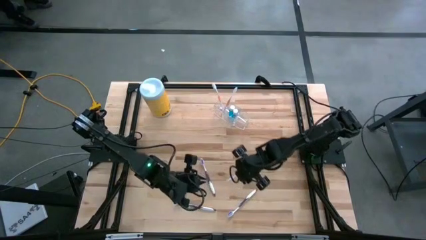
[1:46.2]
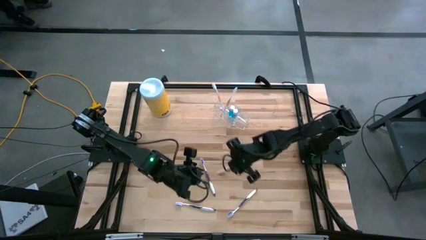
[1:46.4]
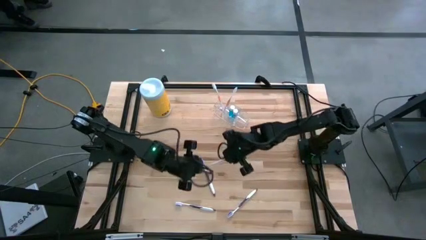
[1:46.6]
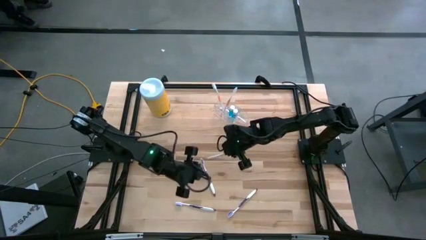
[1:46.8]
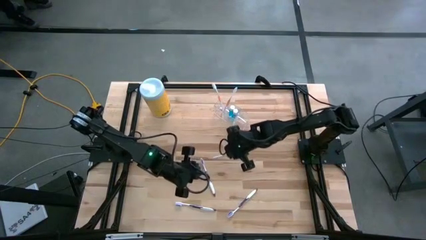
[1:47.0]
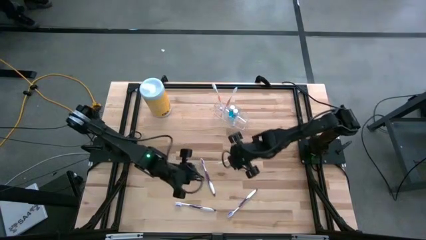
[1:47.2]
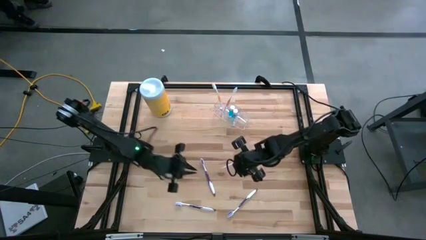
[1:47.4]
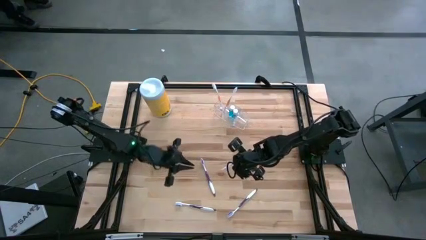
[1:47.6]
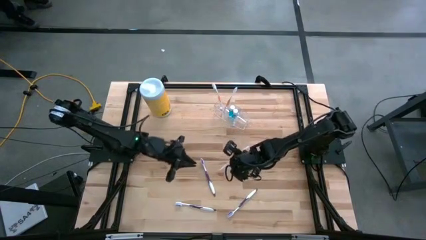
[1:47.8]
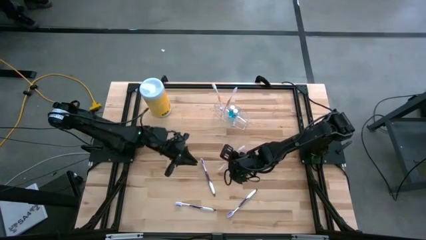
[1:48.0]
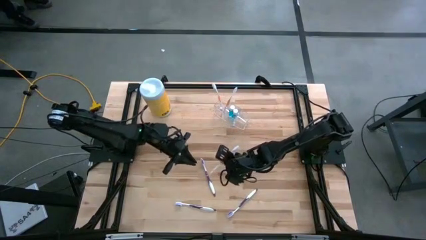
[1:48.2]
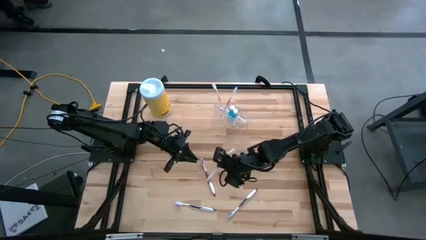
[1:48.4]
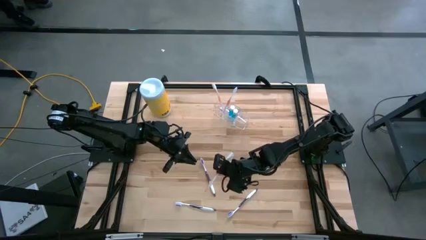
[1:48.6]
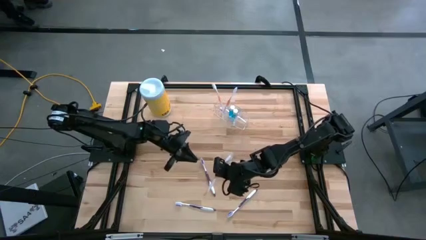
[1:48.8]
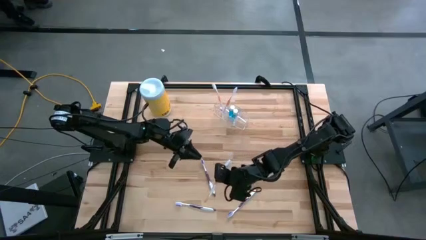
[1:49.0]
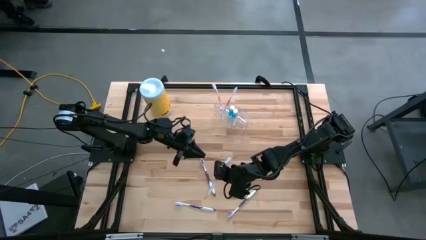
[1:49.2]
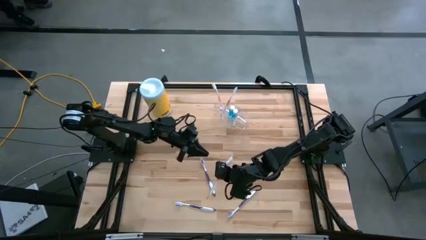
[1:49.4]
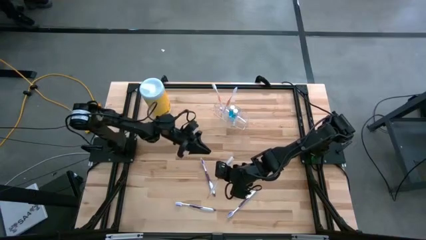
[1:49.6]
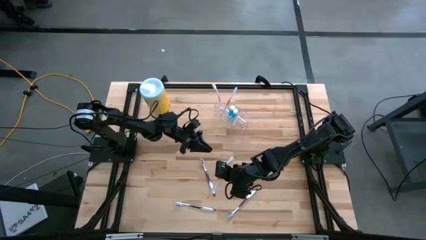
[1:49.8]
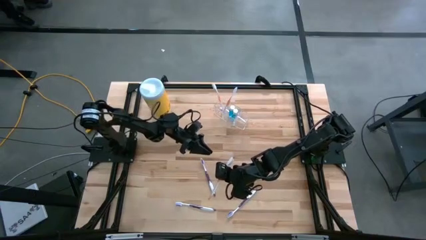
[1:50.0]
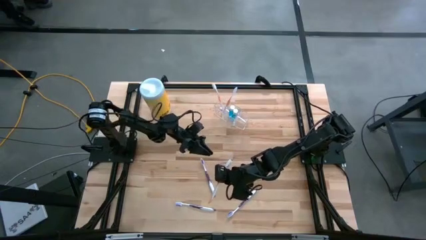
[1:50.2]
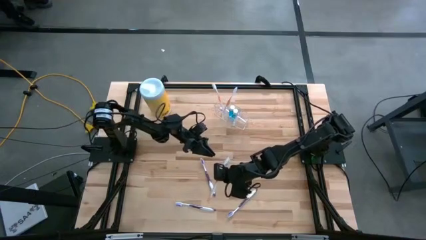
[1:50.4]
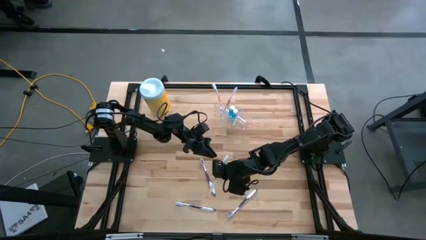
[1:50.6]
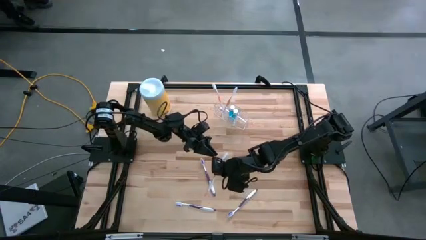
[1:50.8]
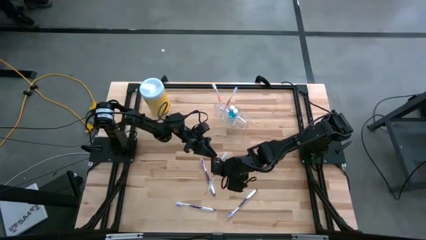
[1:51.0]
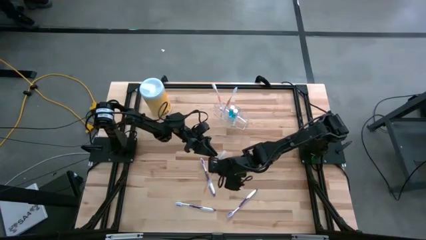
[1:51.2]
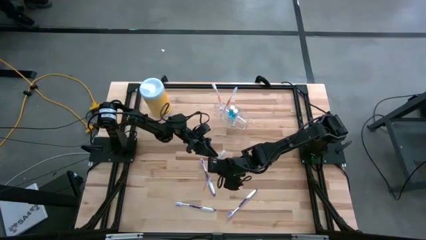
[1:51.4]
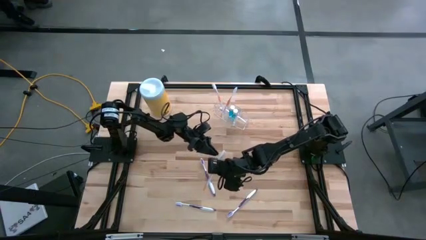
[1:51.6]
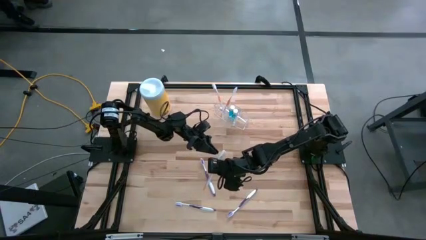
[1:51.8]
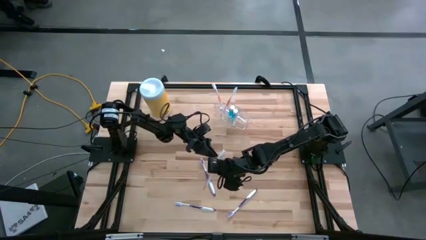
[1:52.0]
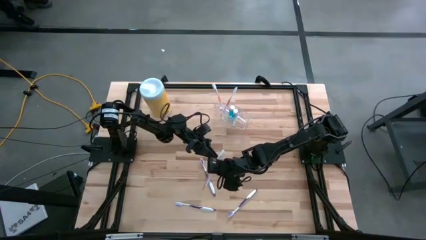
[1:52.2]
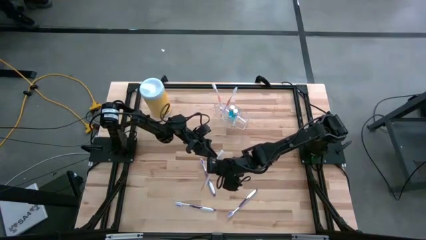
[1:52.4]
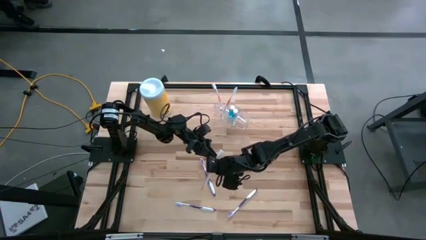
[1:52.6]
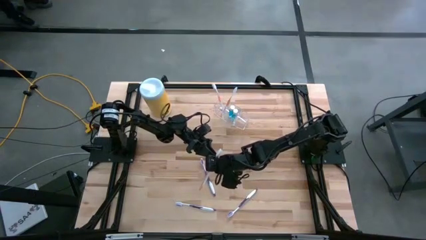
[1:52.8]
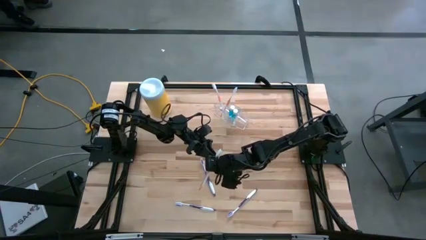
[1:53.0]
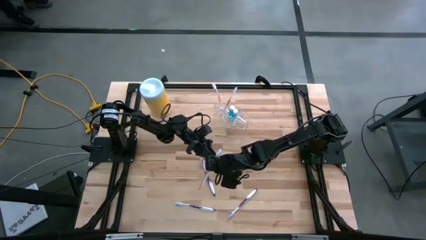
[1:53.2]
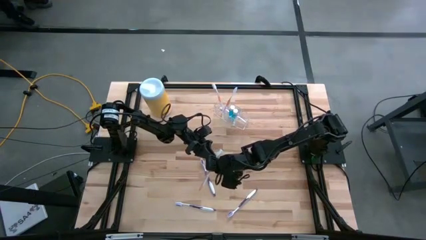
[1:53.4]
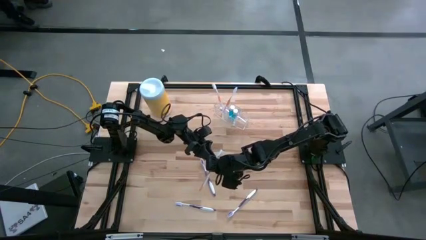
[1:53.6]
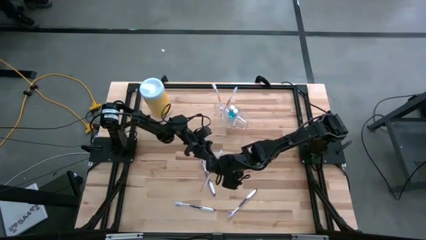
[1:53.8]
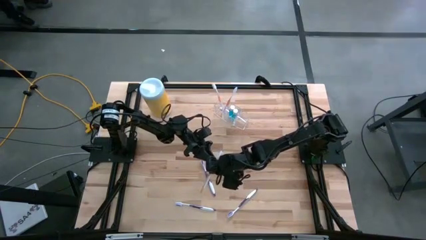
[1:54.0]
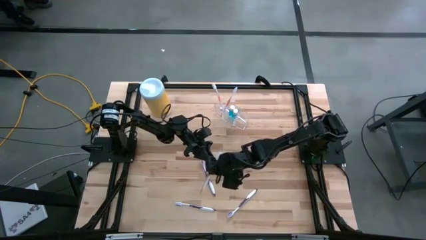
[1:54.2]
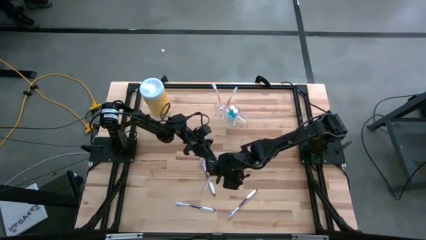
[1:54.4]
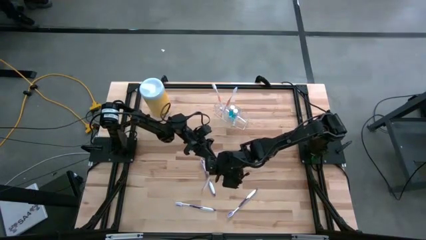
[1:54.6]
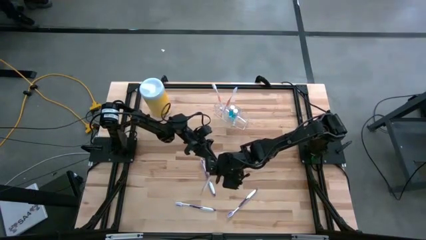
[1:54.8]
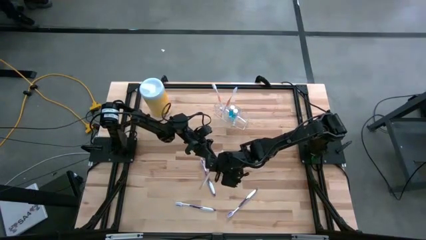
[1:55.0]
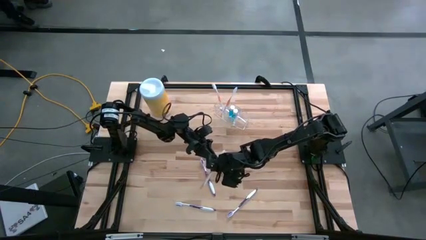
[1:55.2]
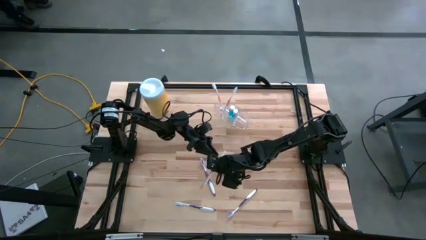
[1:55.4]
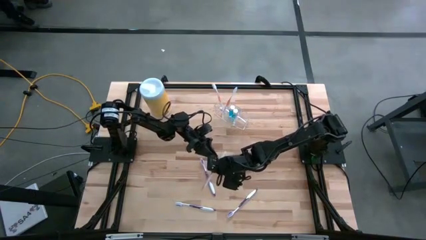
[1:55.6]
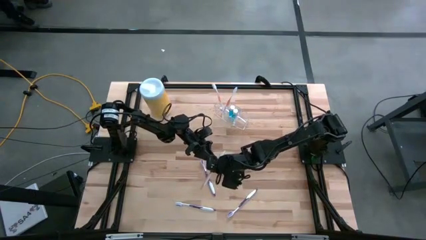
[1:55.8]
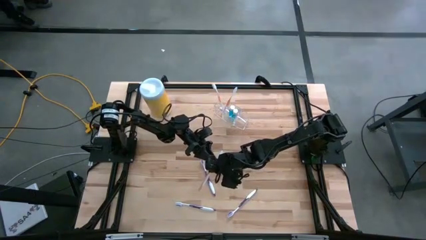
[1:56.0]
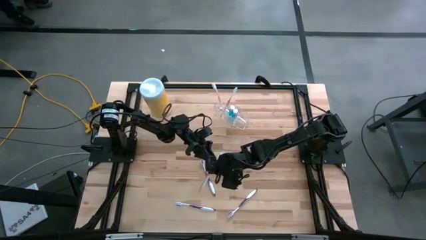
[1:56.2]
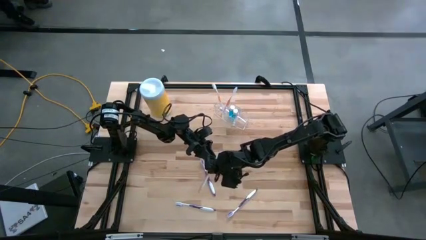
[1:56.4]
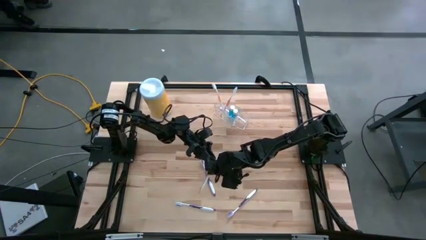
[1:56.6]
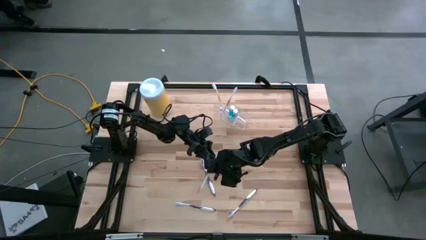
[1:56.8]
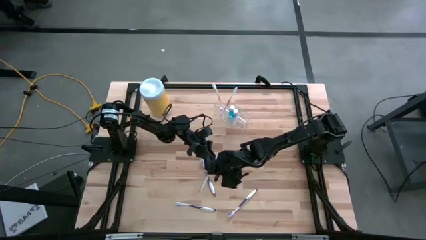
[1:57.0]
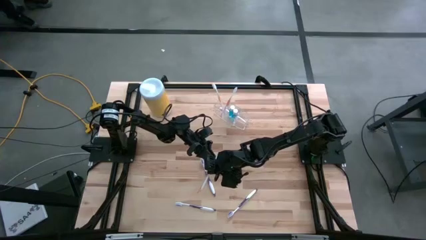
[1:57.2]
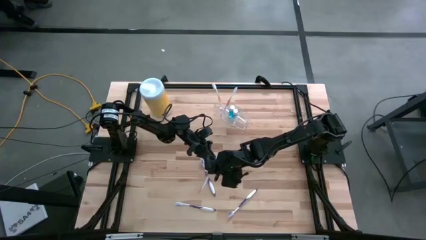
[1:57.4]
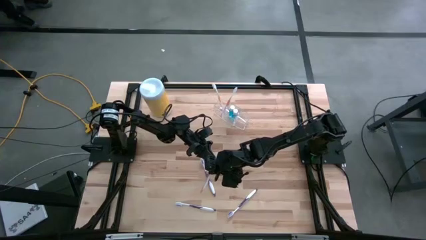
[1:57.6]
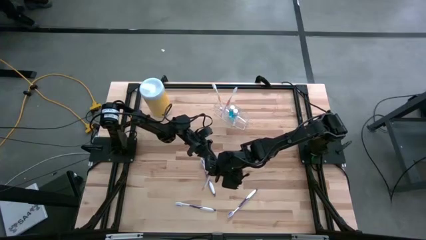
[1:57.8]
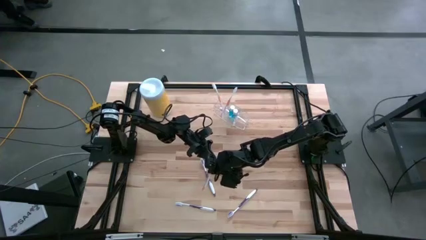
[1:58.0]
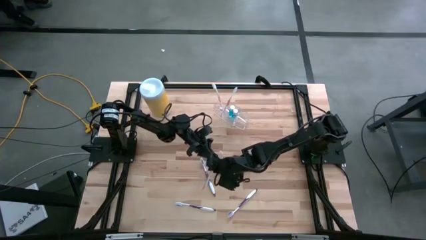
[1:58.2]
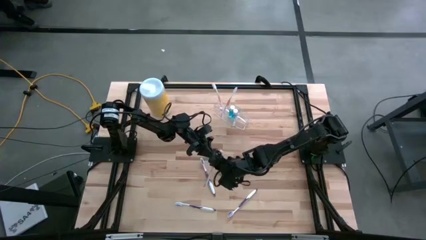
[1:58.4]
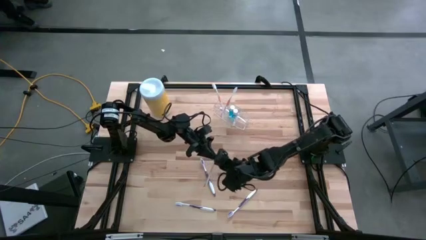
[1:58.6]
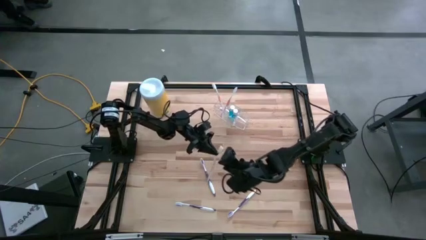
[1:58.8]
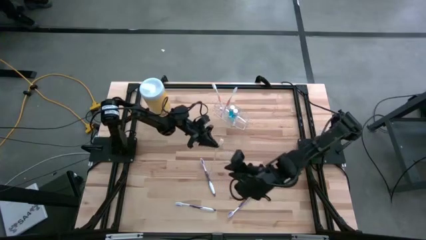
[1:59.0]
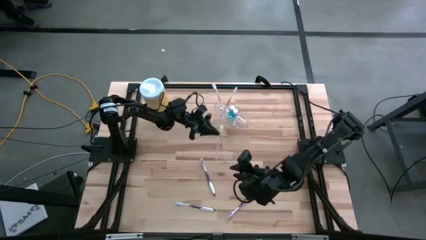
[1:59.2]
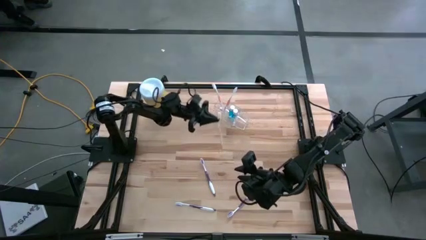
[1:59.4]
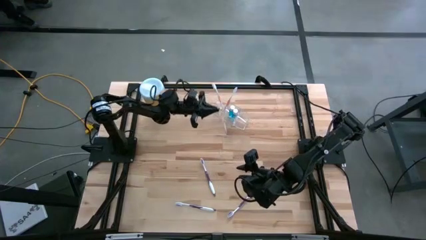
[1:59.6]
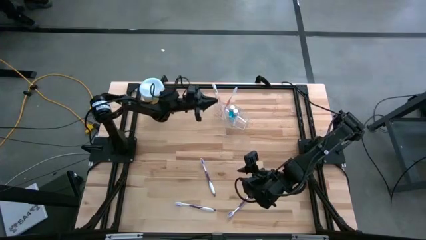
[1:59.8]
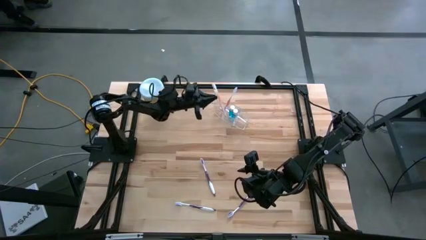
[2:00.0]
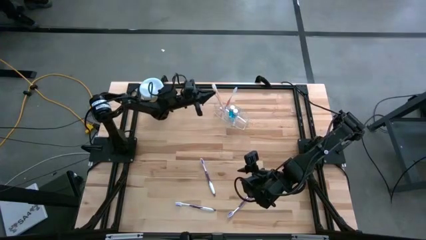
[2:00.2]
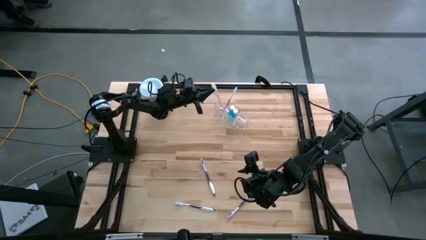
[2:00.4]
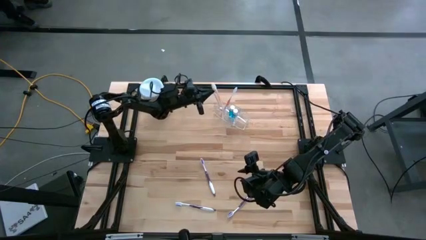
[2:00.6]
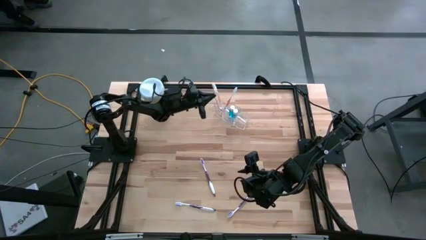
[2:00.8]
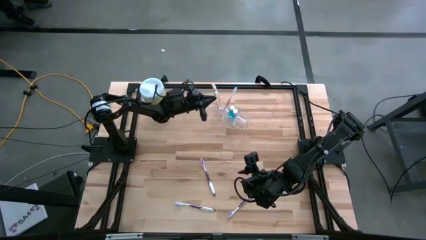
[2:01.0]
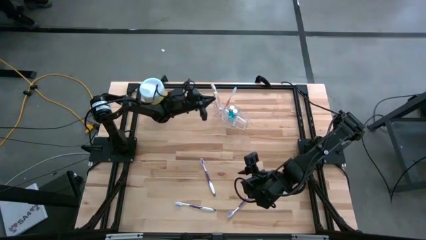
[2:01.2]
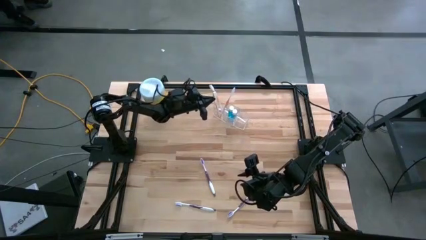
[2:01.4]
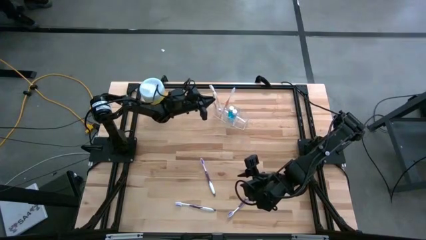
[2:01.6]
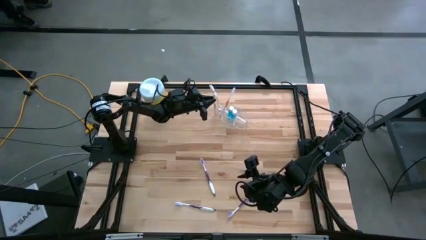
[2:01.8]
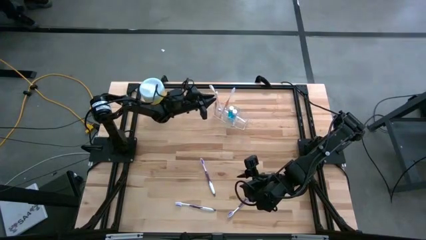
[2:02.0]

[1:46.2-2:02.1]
Task: Pick & Place toothbrushing station
Put the orange toothbrush into the transparent organizer
